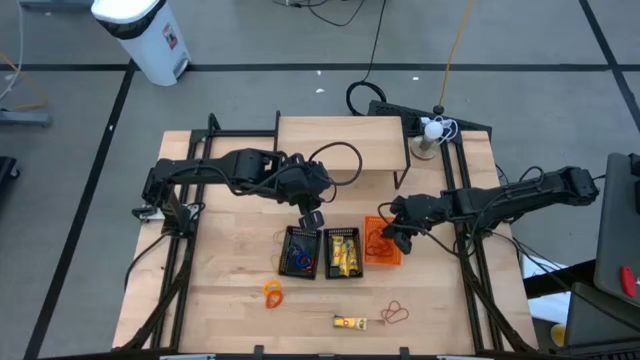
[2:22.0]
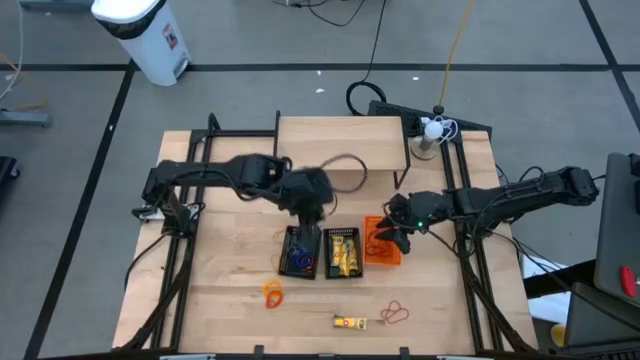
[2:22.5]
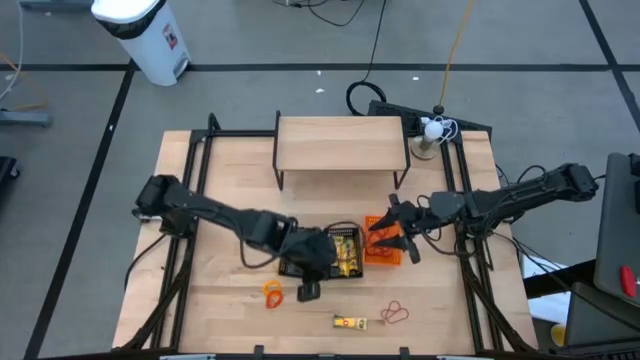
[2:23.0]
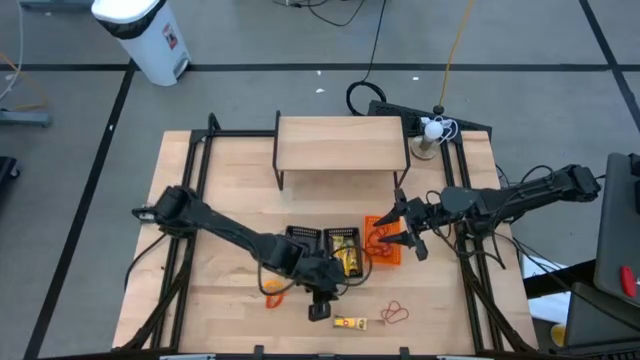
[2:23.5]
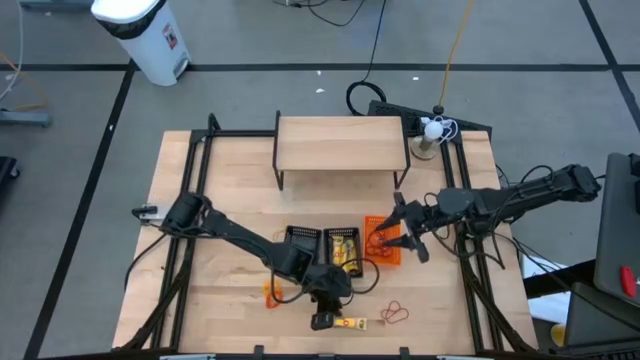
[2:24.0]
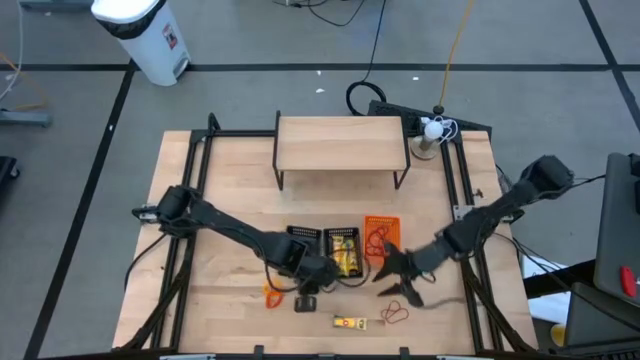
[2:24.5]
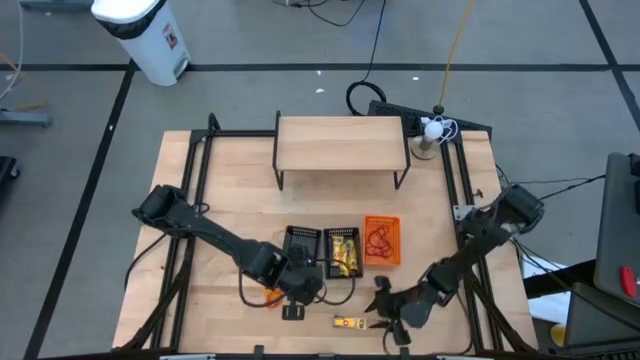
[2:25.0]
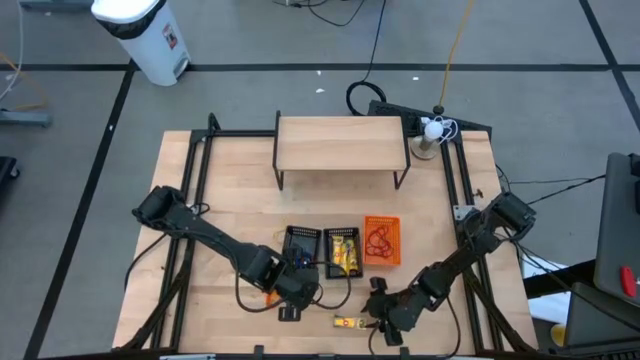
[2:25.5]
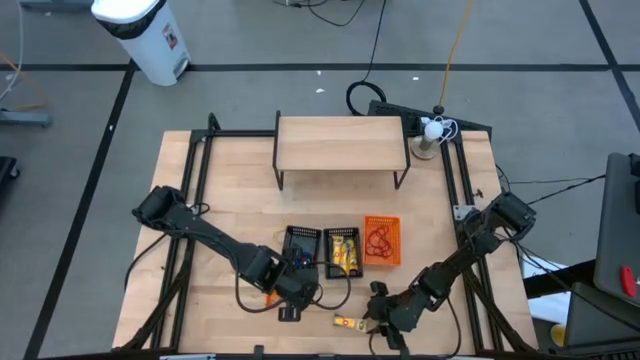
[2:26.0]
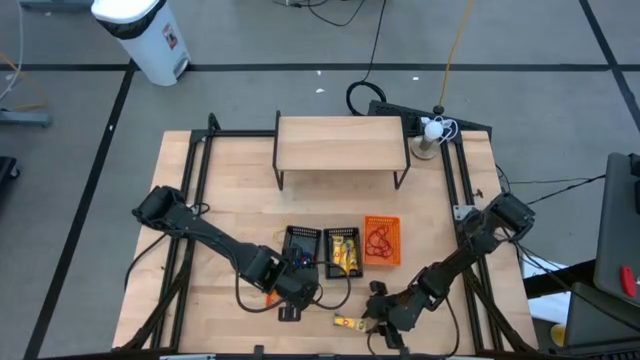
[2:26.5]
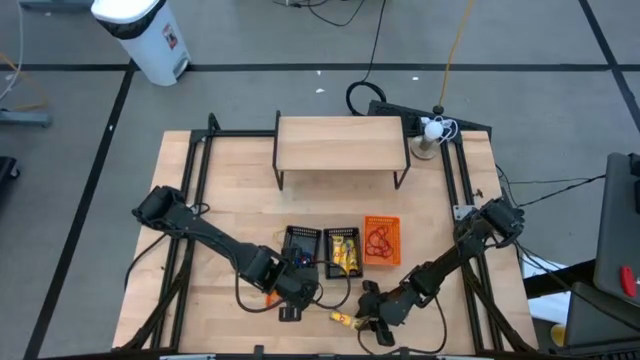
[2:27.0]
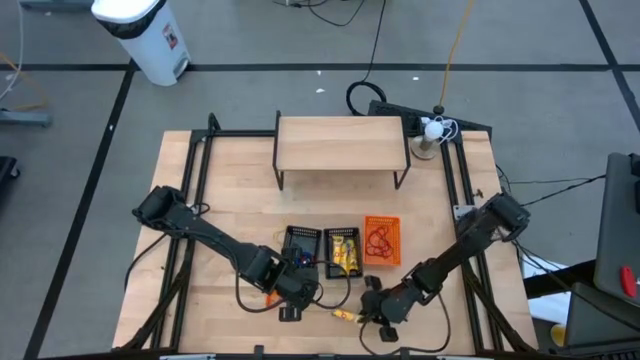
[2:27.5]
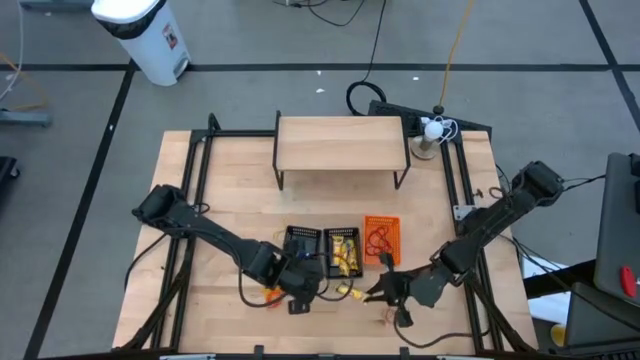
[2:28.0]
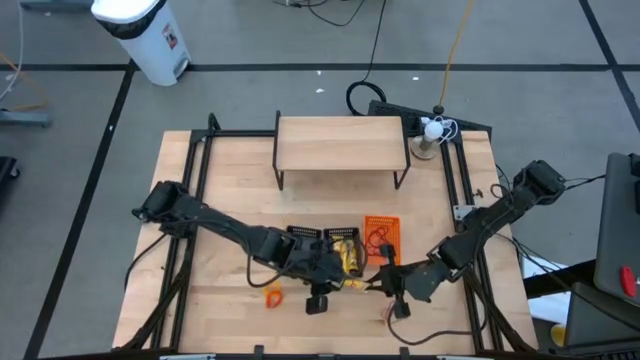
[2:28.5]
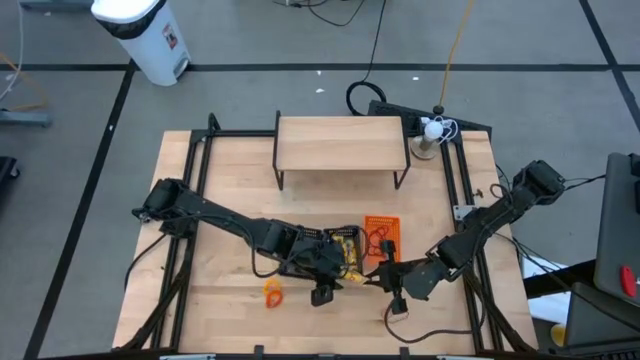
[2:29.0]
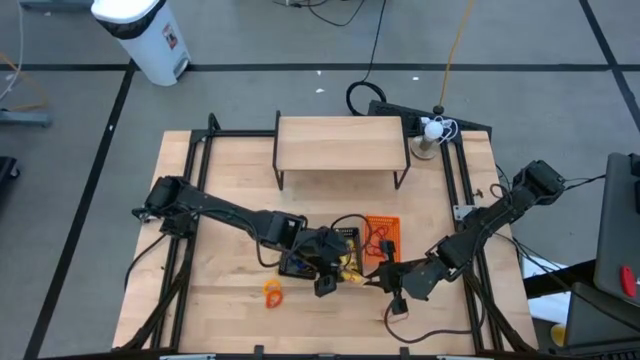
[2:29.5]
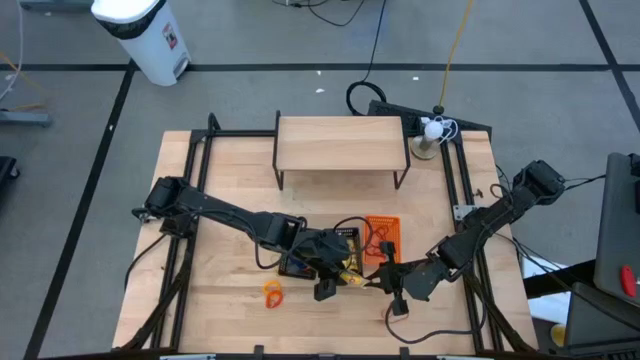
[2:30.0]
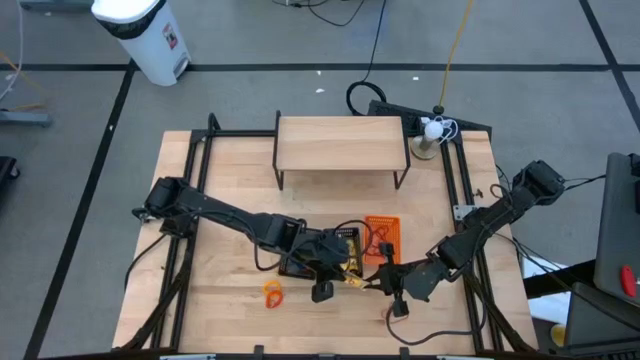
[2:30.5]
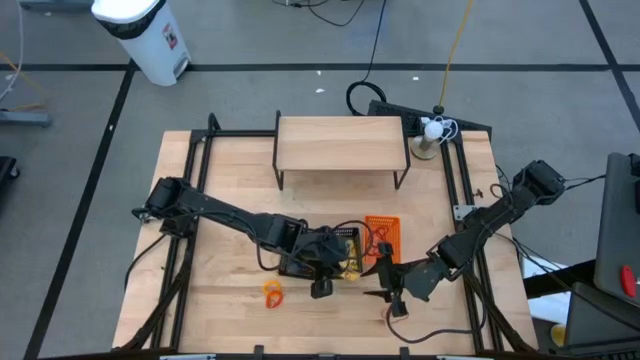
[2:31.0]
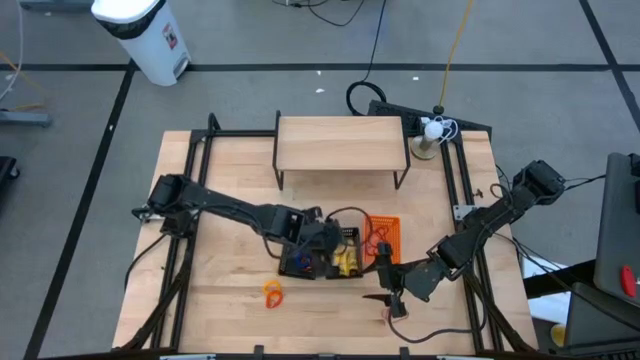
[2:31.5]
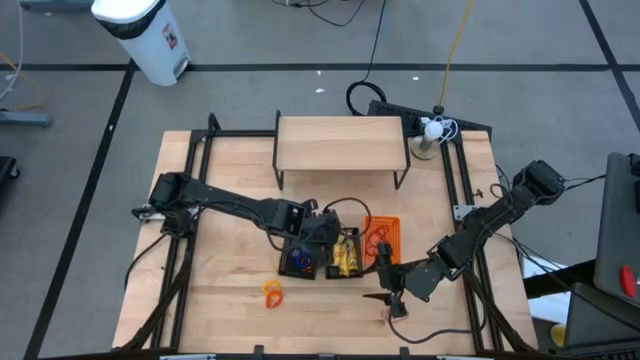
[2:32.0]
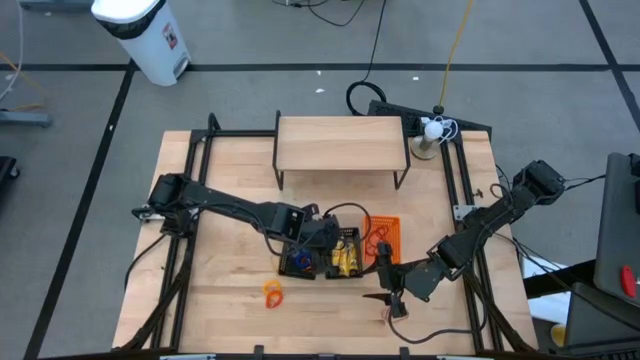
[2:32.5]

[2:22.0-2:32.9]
Task: Pick & Place Office Desk Supplies
Put the crayon box into the right black basket

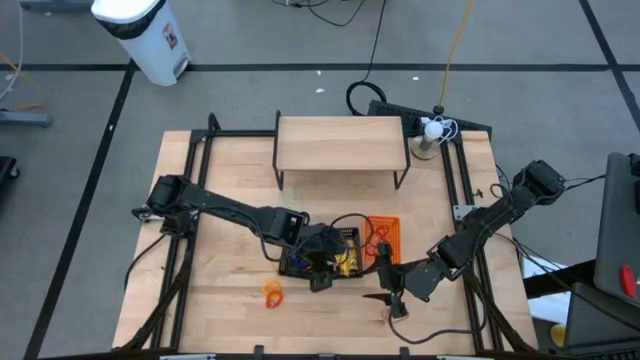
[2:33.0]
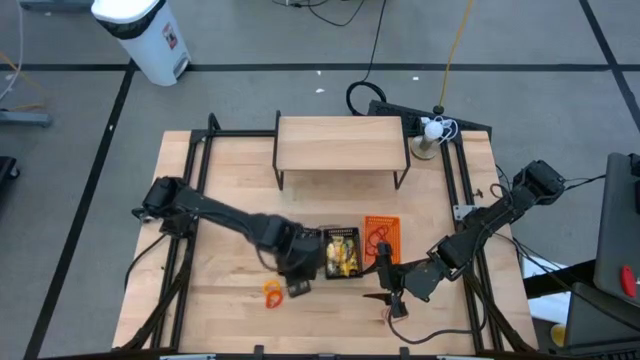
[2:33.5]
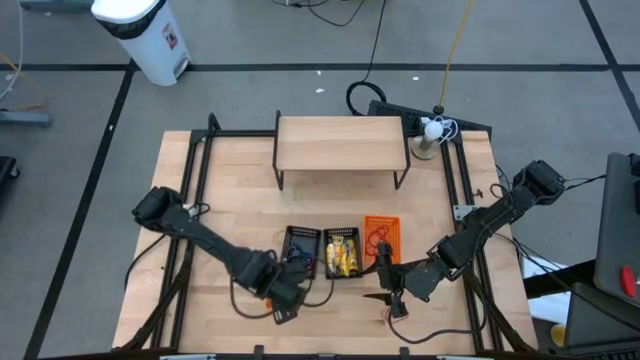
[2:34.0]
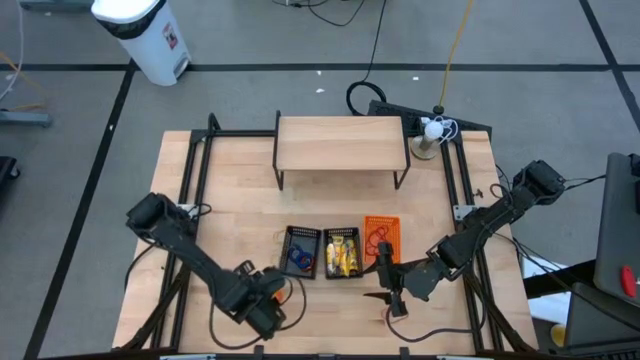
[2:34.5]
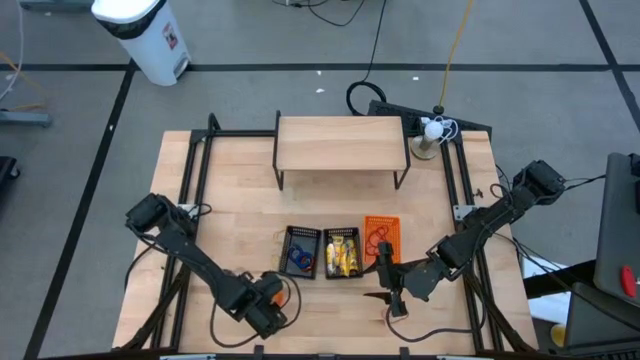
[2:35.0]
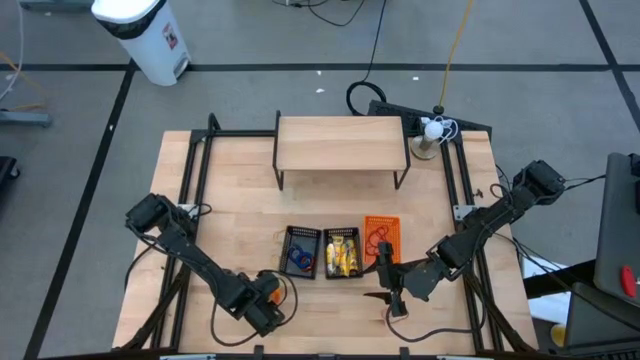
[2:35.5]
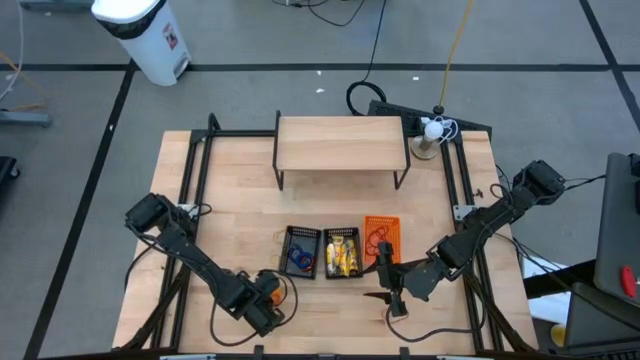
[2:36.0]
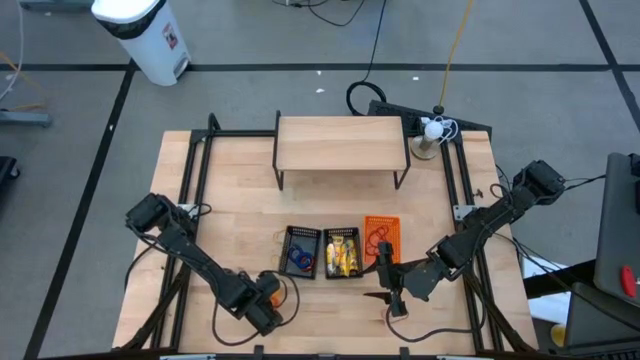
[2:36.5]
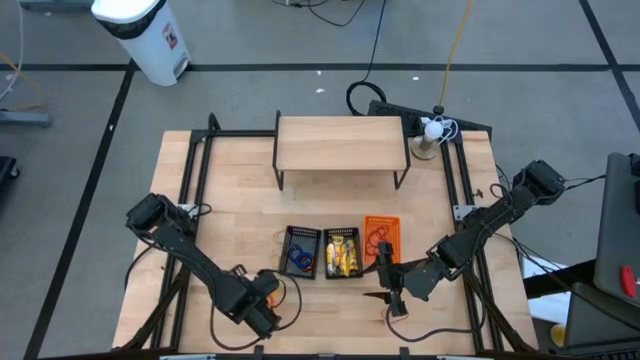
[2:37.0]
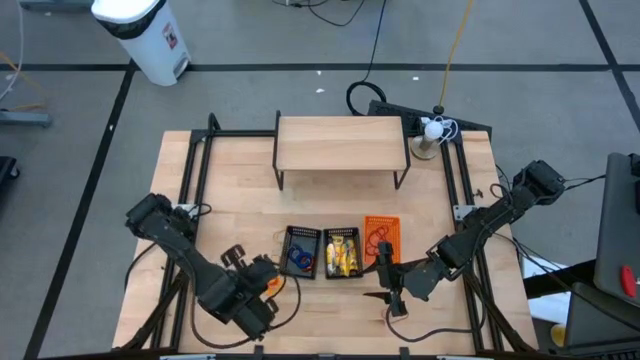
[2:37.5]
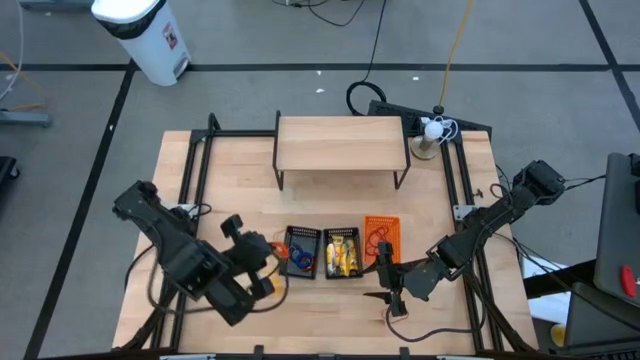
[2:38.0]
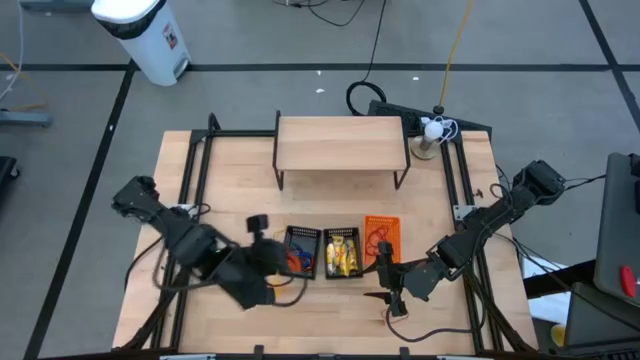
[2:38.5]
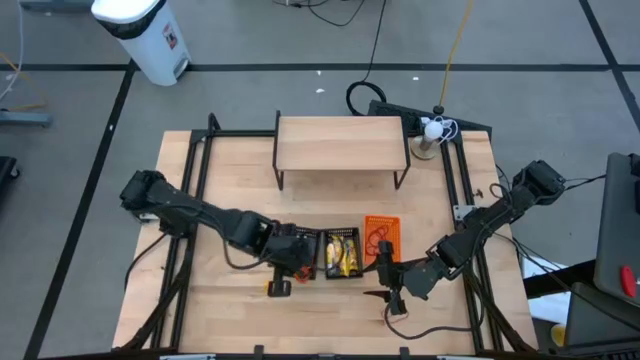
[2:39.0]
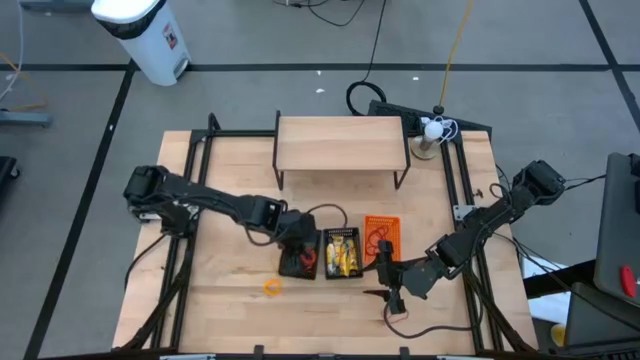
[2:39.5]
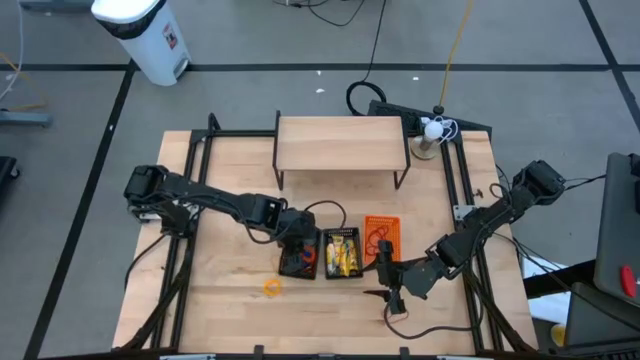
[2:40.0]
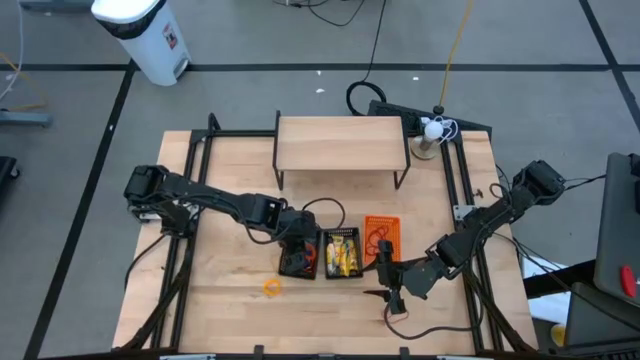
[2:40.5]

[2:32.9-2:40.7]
Put the orange spring rubber band into the left black basket

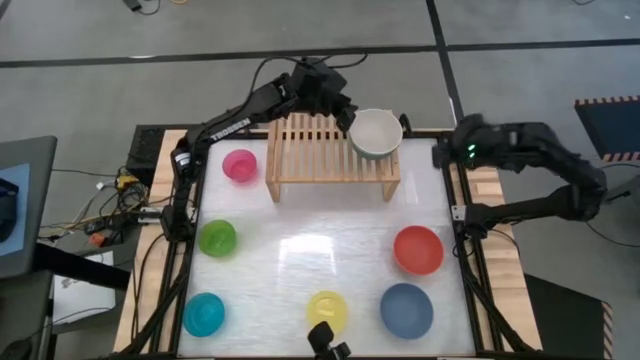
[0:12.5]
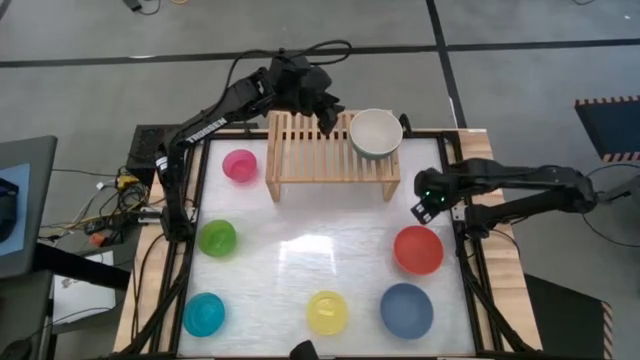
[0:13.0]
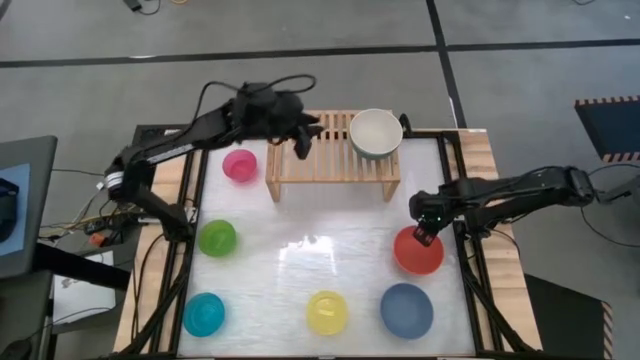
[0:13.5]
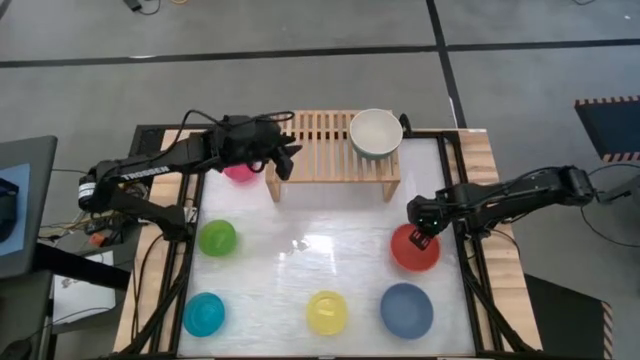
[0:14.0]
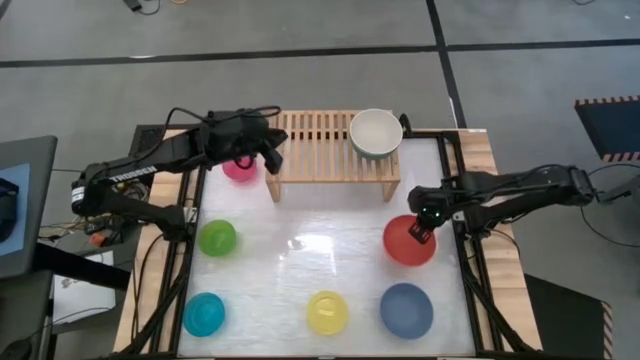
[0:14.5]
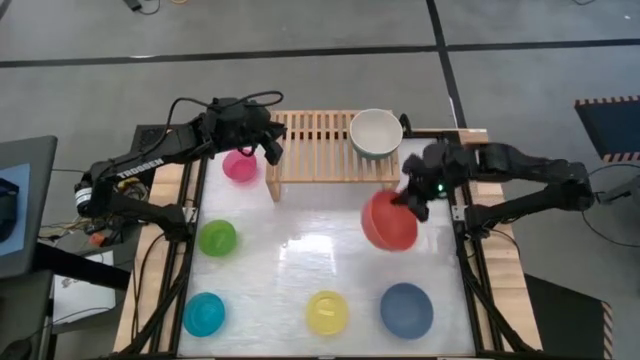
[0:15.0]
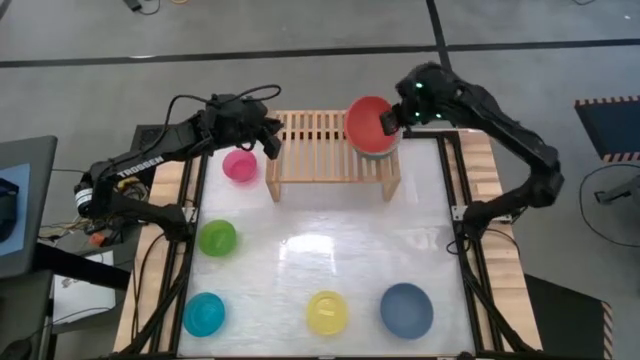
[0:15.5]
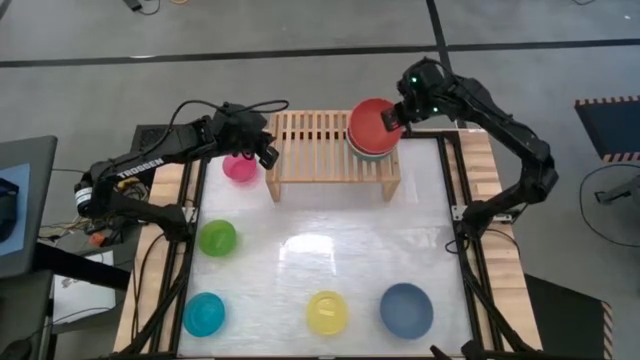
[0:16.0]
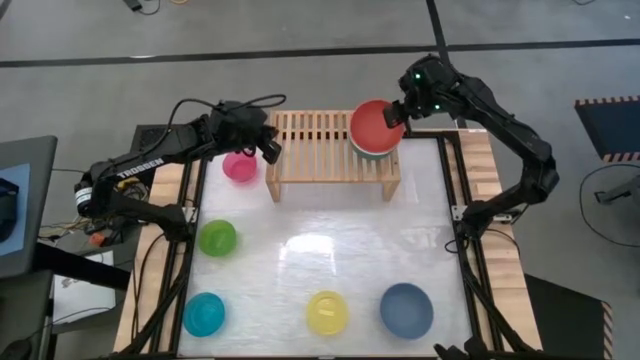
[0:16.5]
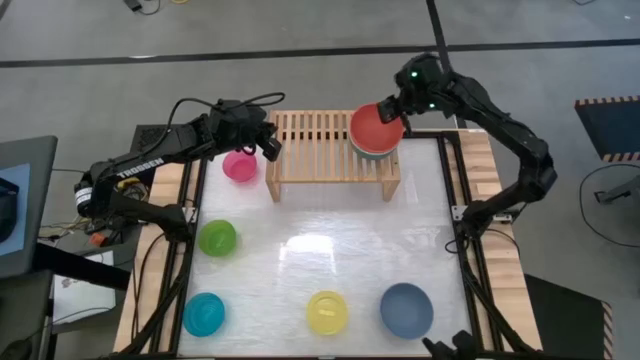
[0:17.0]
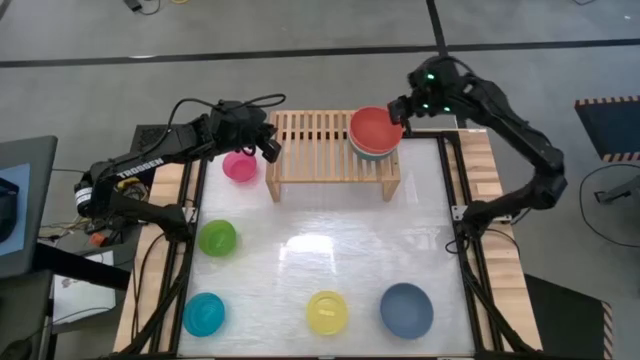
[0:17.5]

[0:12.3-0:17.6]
Task: Place and stack bowls onto a shelf
Stack the orange bowl on top of the gray bowl on the shelf
